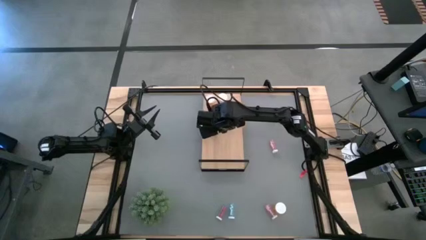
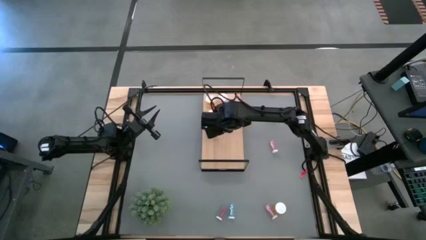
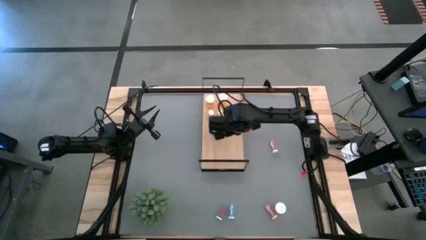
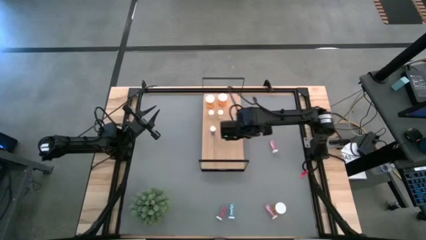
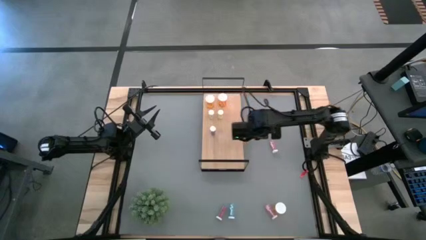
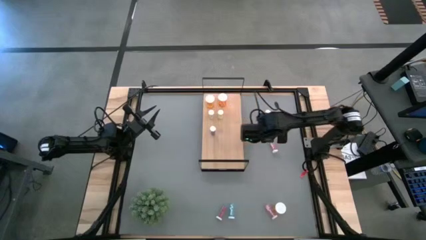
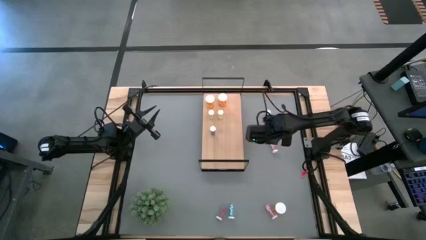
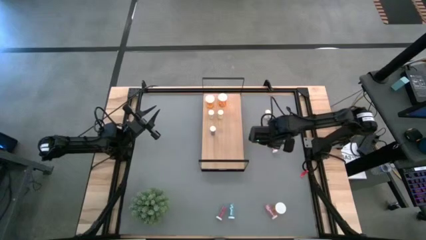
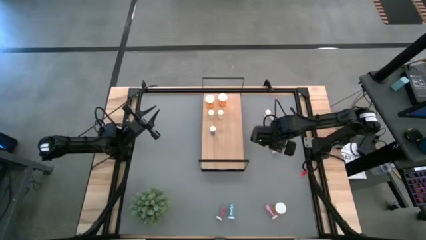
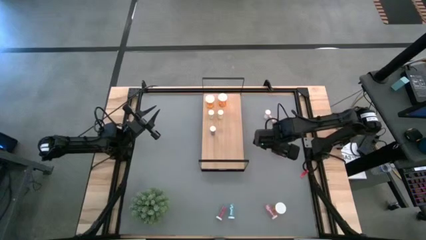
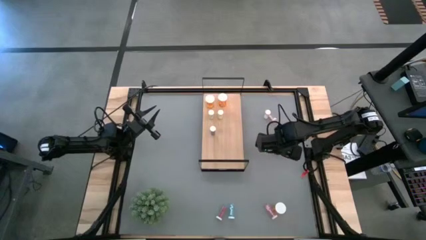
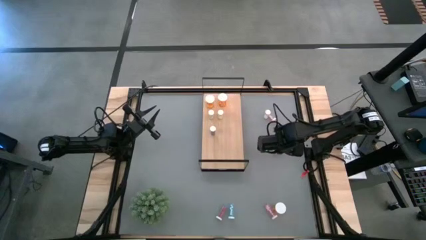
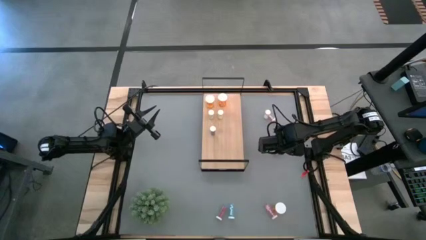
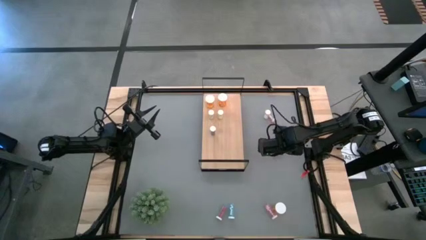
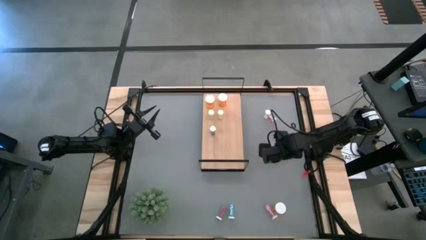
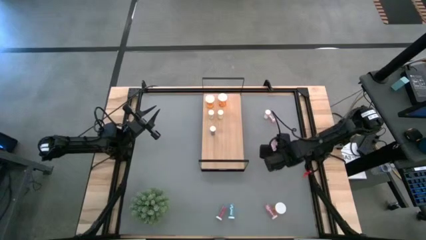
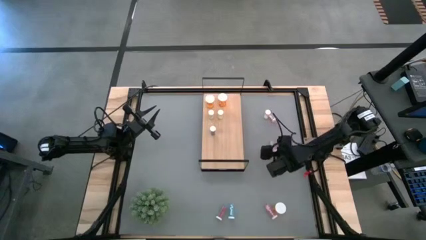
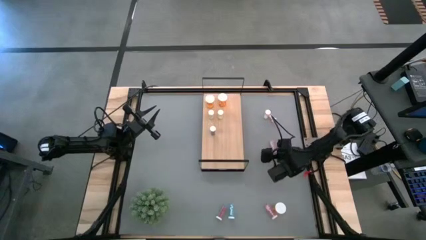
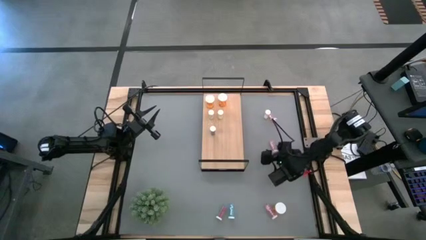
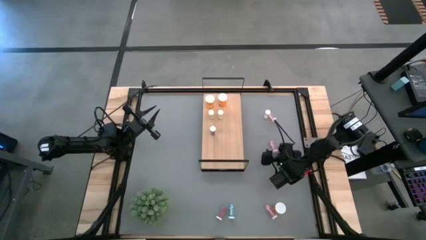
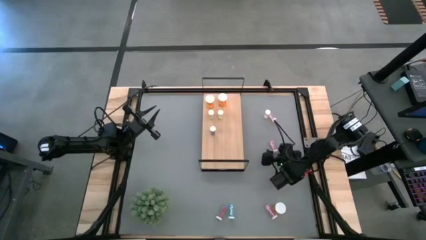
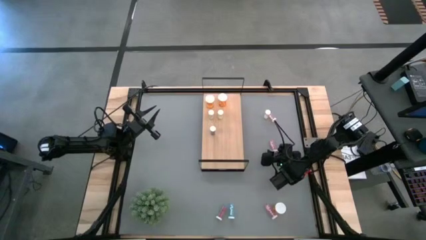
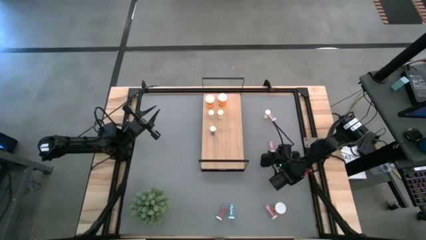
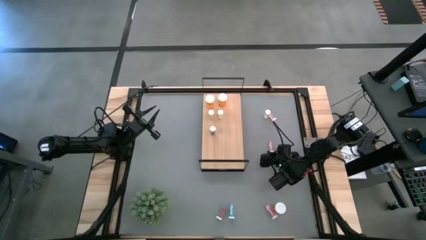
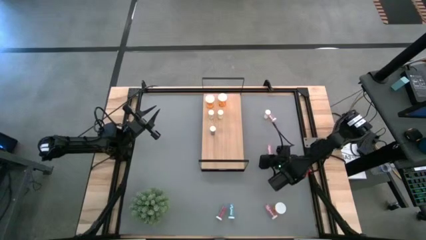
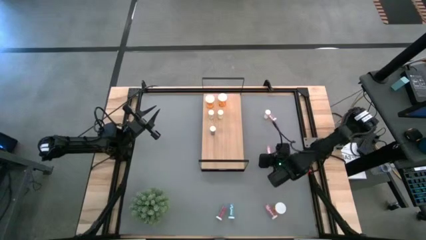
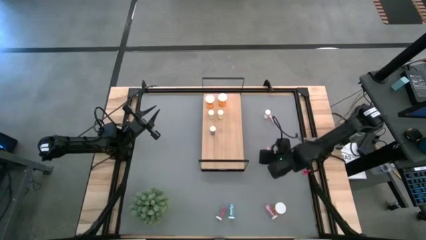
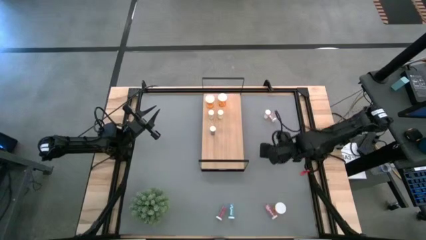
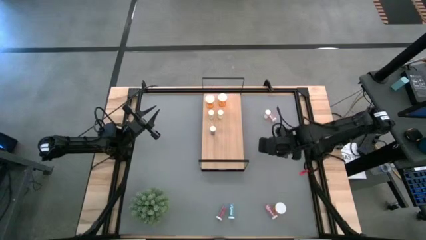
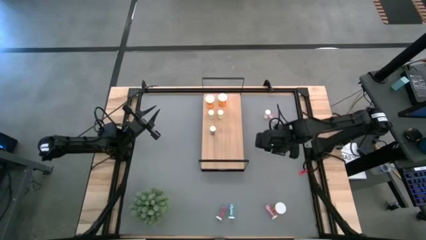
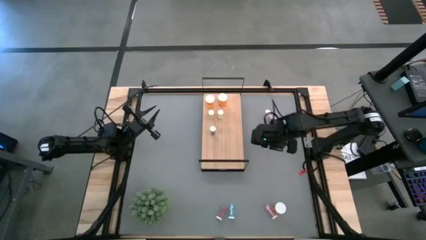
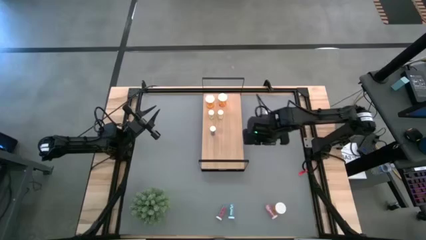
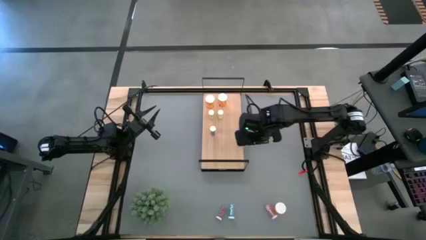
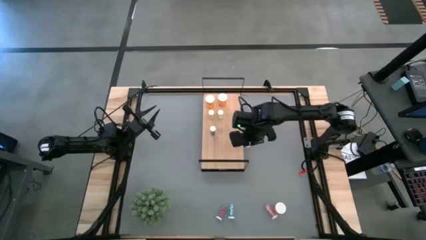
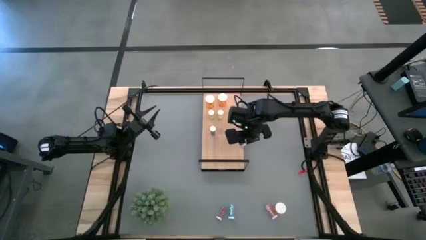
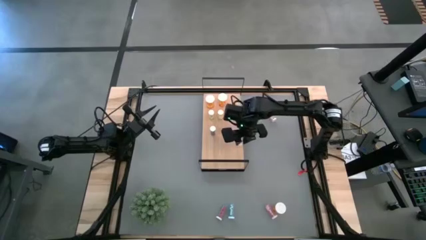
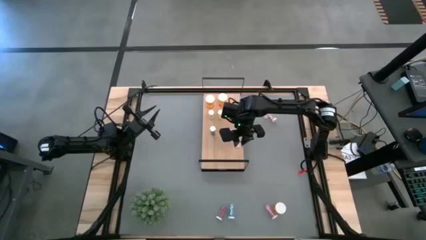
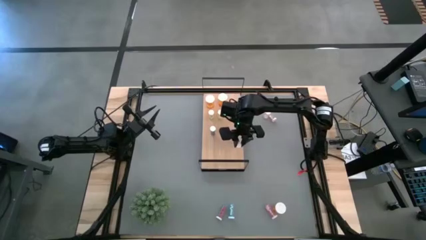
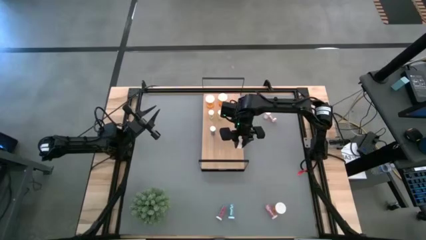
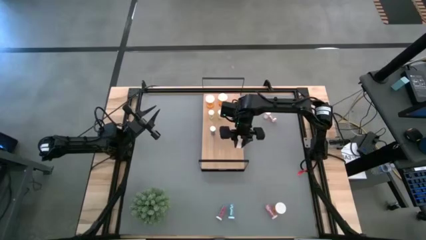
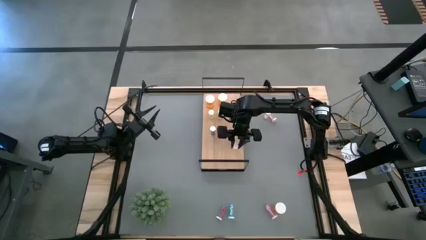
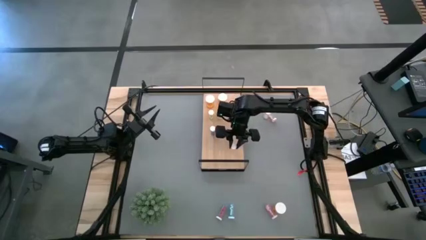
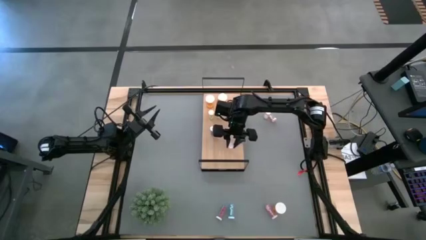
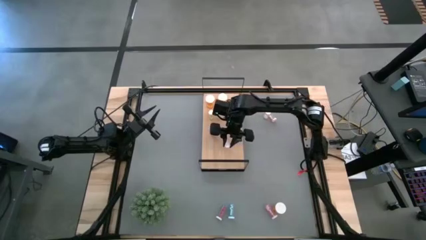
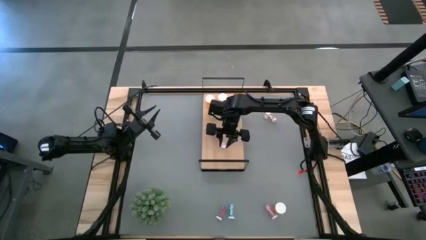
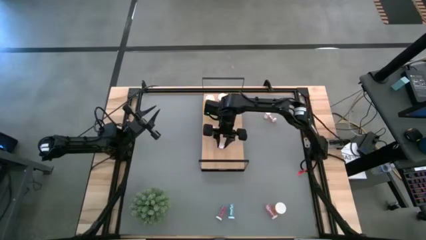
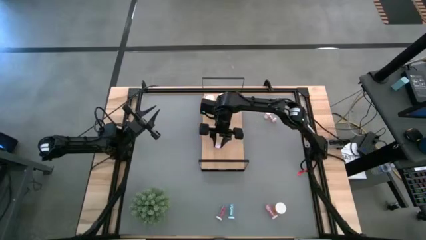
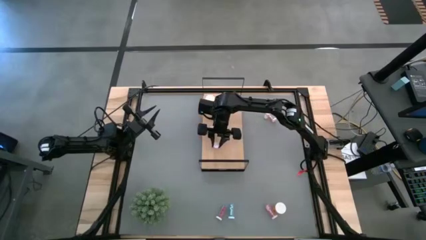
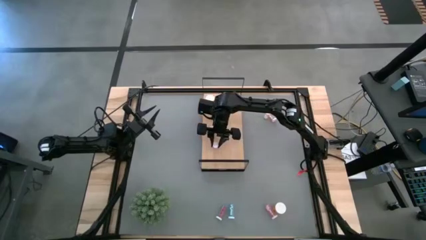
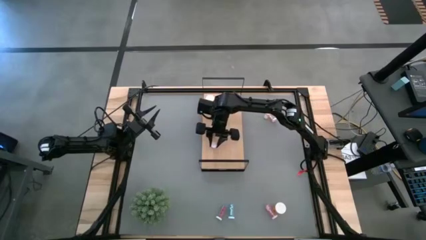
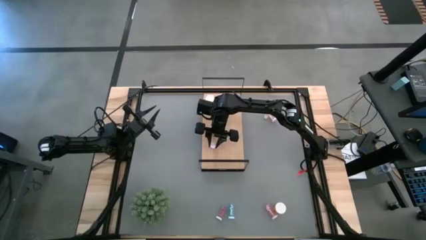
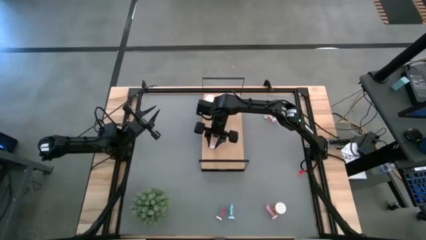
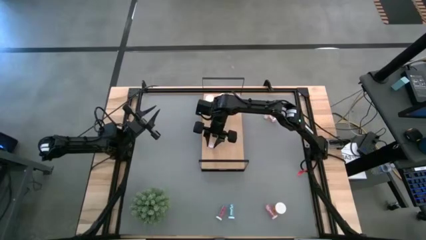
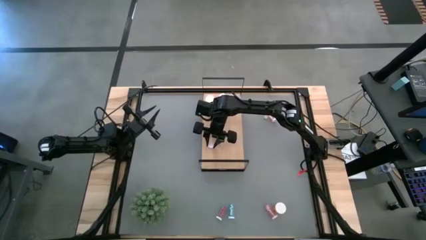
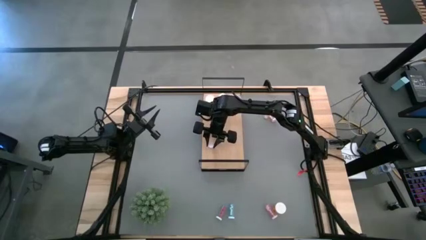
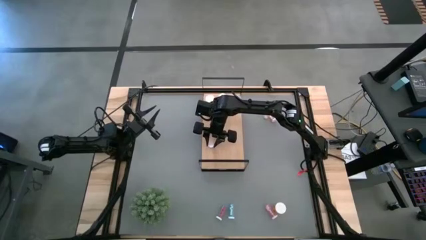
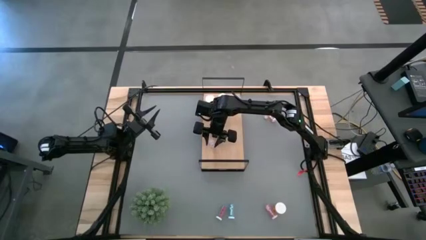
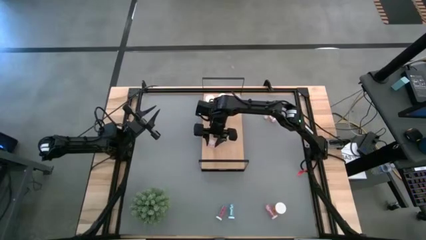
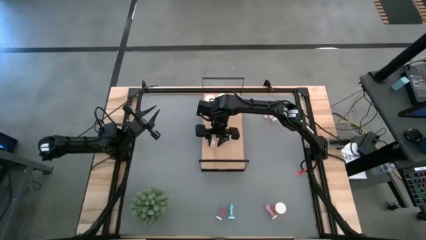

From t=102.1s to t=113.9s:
Task: Pick and place medicine bottles onto shelf by color
Put the middle pink pill bottle on the shelf
